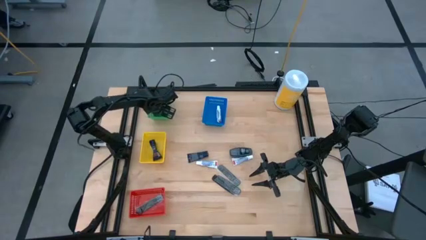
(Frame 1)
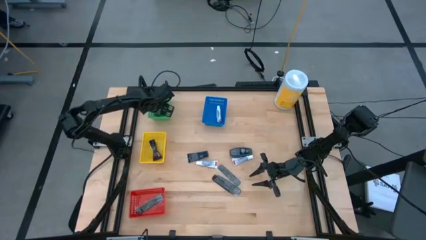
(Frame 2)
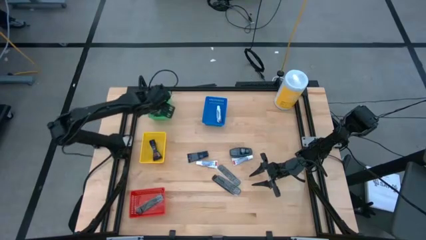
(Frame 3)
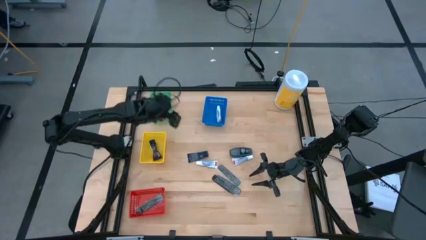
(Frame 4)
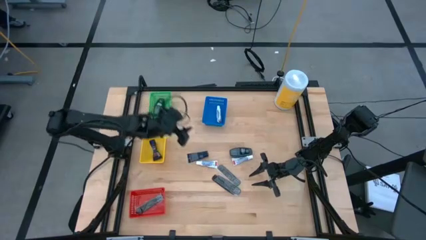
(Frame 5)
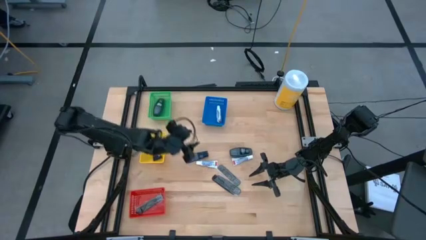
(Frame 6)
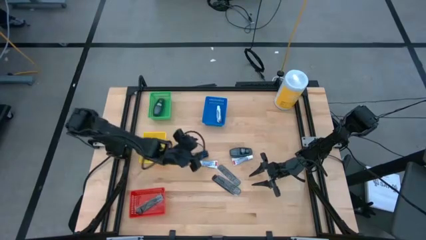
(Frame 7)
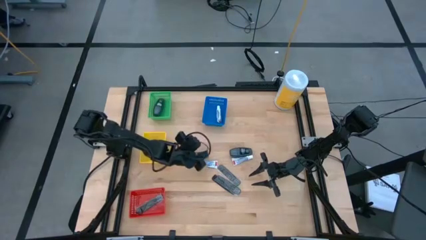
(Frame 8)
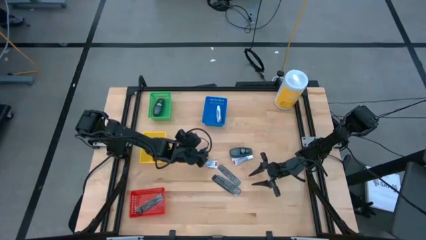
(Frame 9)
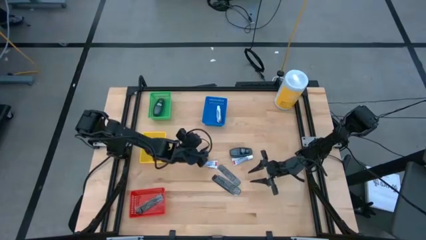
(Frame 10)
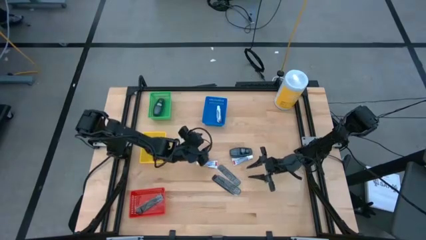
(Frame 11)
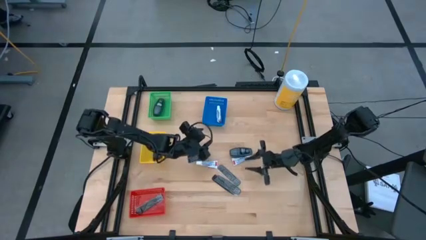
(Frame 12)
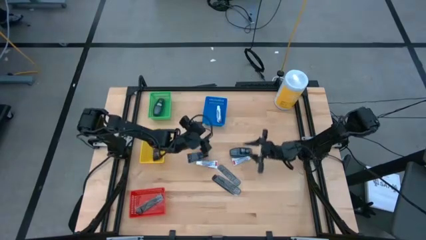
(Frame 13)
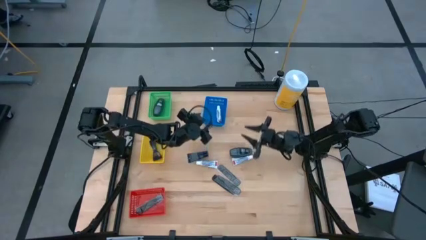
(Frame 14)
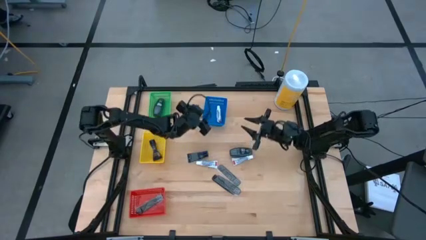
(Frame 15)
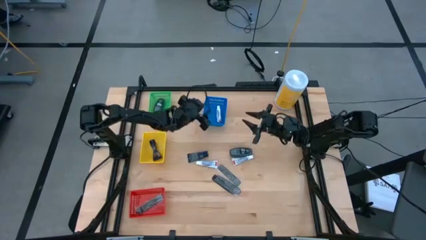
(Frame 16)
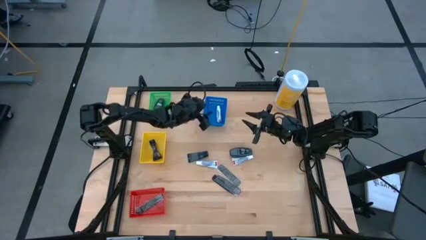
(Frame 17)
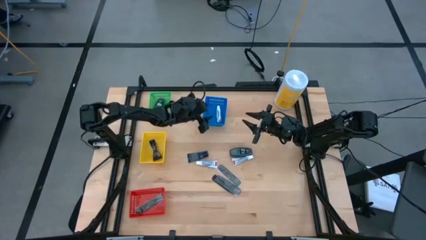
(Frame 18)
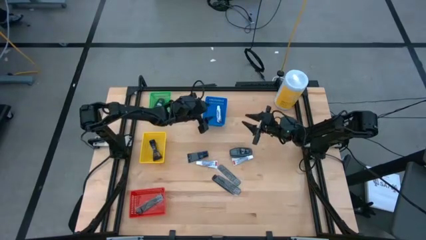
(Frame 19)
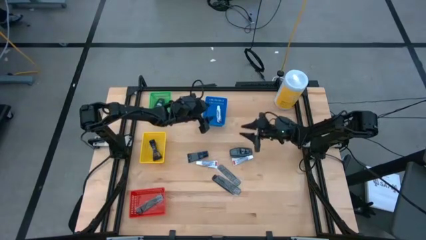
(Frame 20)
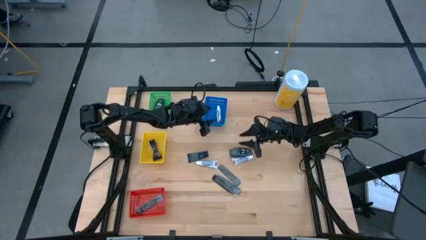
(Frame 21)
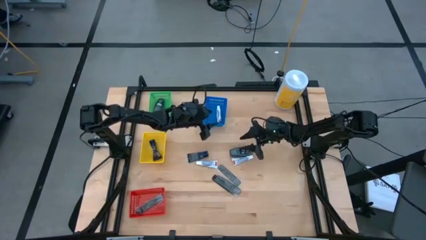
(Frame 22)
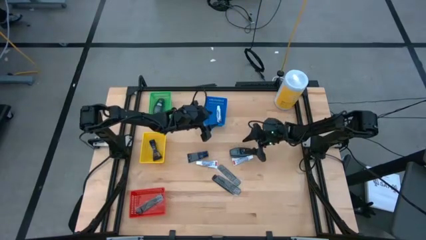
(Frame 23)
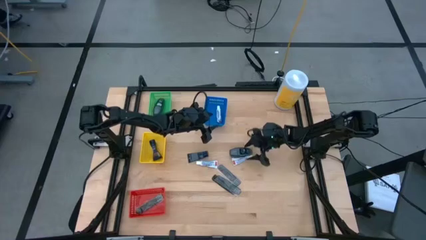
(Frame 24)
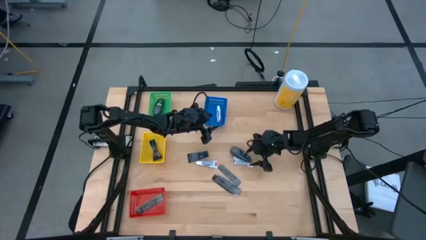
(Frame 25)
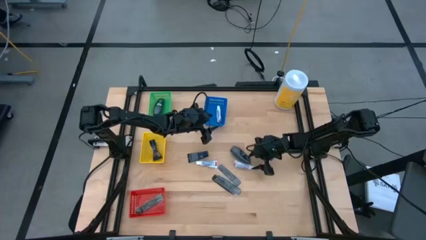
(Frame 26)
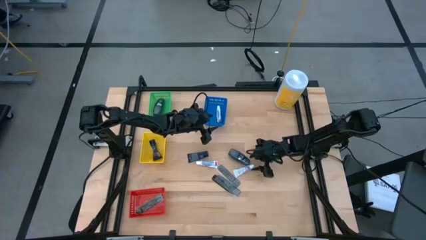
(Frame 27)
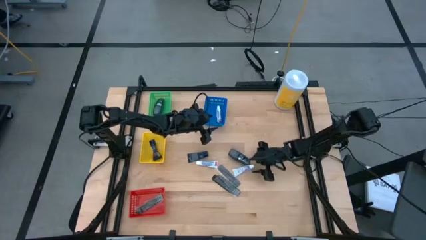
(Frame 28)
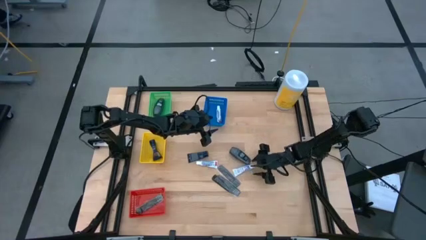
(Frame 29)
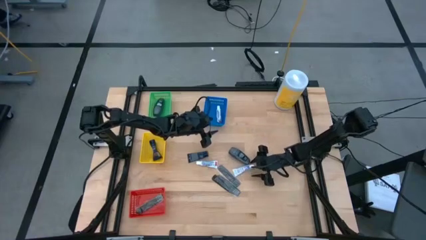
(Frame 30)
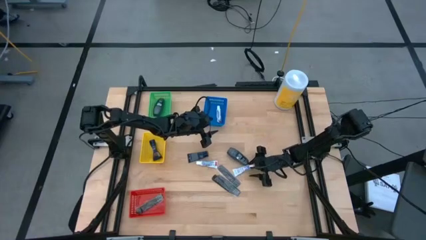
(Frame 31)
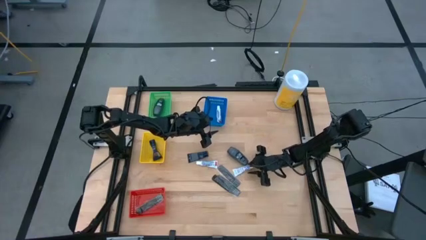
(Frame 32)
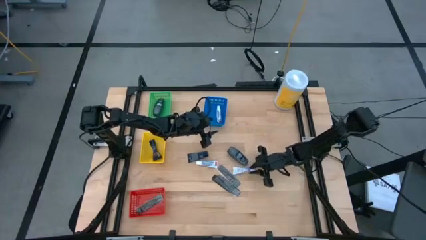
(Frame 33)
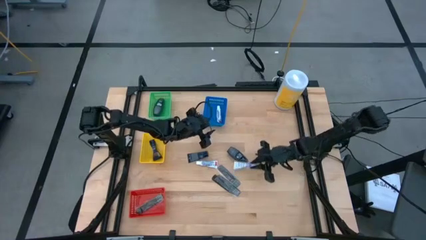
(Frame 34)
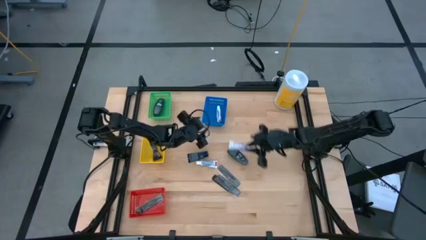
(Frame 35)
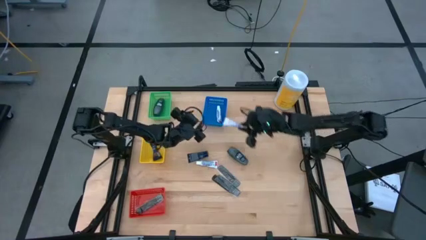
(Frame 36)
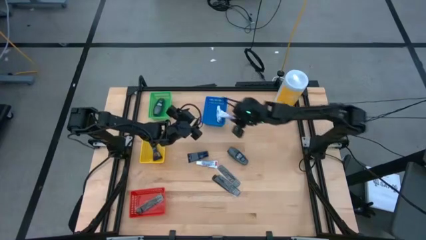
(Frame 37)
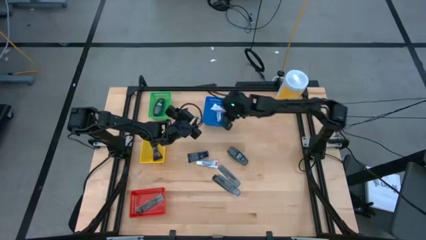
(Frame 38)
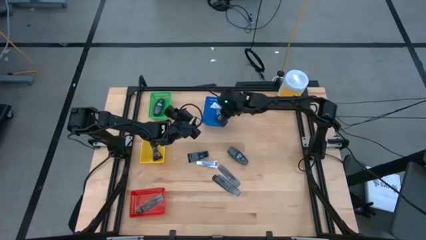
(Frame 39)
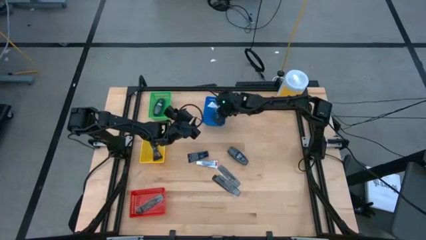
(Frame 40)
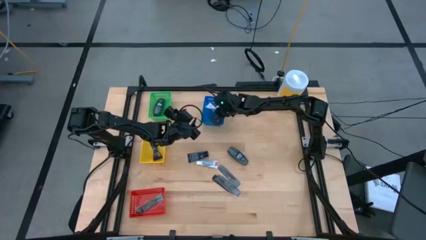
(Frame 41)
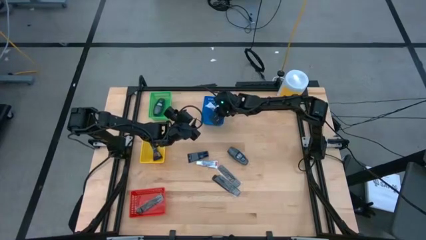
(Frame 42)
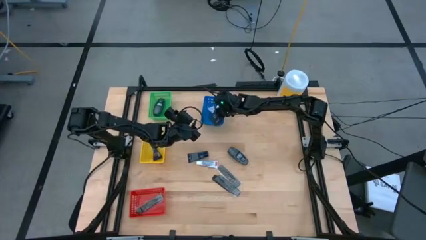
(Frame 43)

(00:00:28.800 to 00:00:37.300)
Task: Pick & Place Travel size toiletries
Put the white toothpaste in the blue basket

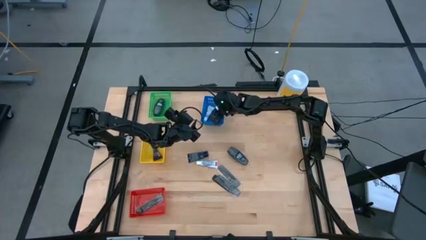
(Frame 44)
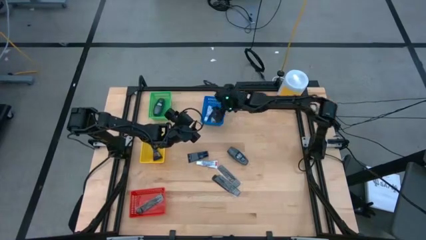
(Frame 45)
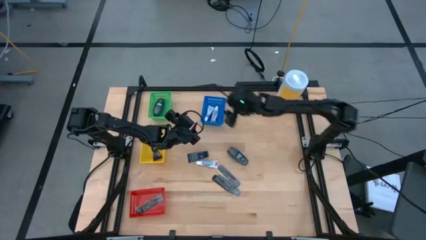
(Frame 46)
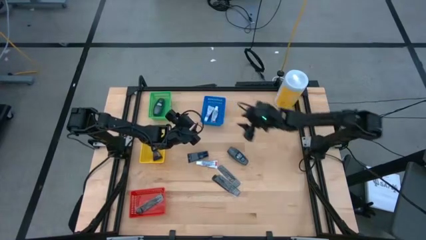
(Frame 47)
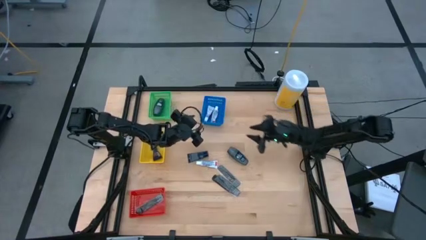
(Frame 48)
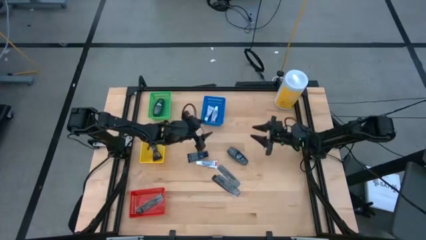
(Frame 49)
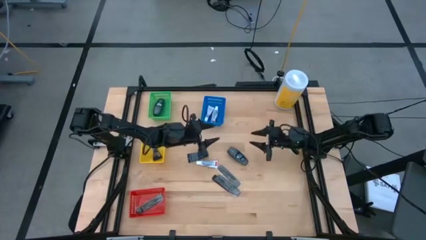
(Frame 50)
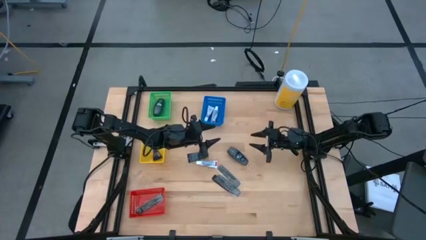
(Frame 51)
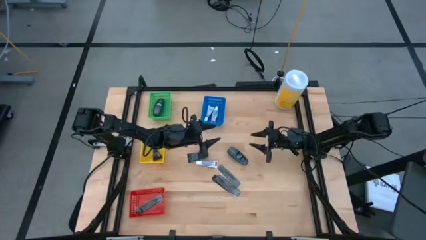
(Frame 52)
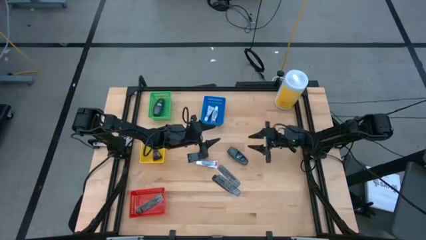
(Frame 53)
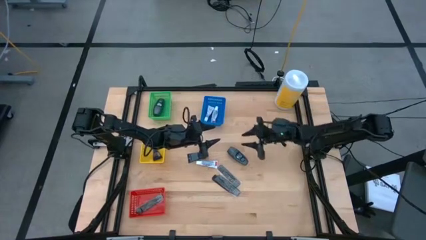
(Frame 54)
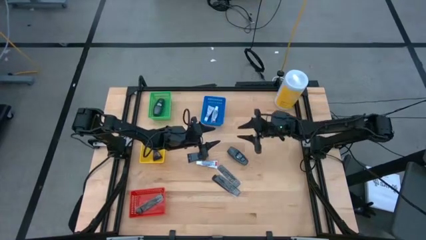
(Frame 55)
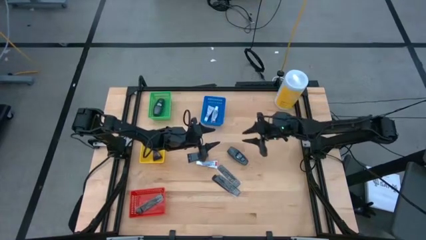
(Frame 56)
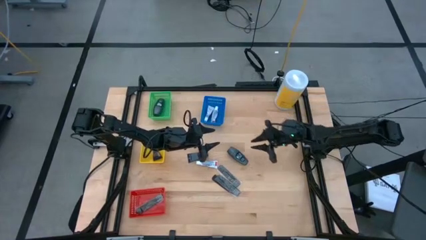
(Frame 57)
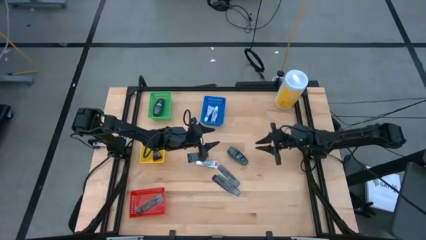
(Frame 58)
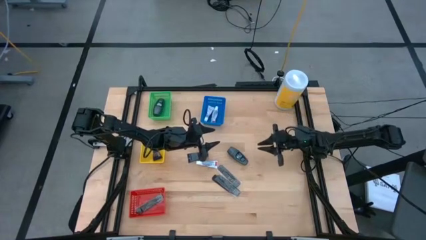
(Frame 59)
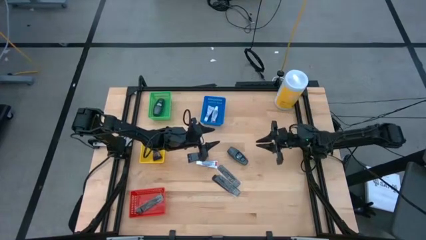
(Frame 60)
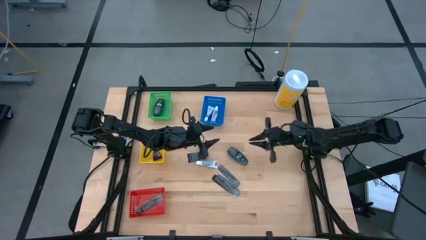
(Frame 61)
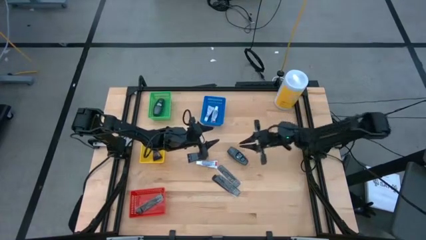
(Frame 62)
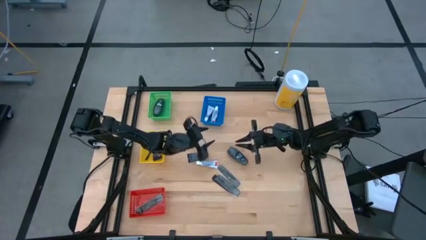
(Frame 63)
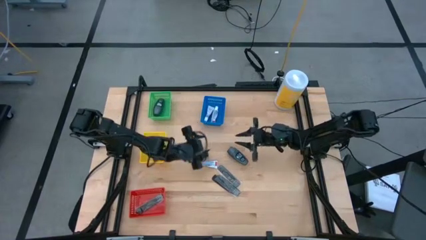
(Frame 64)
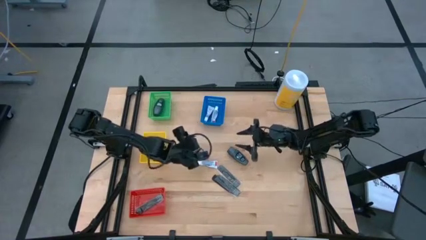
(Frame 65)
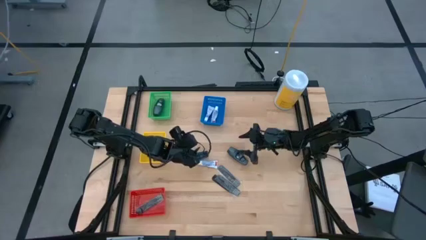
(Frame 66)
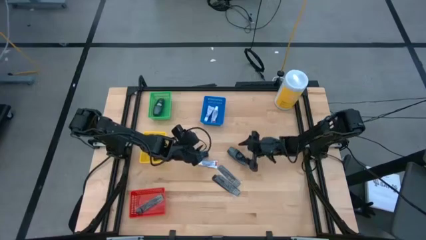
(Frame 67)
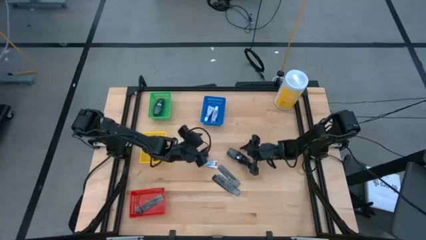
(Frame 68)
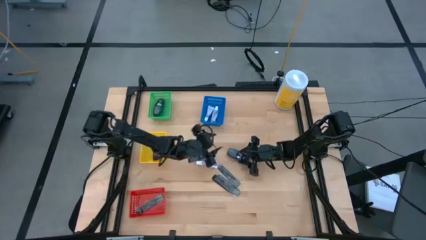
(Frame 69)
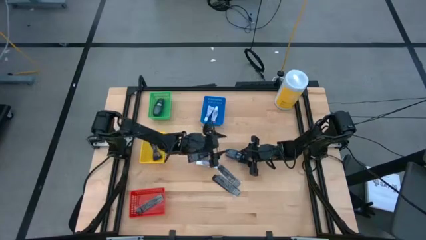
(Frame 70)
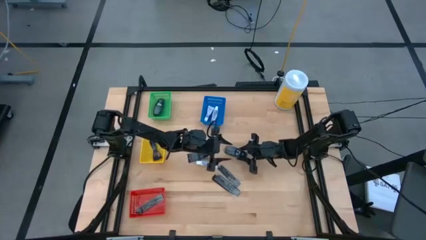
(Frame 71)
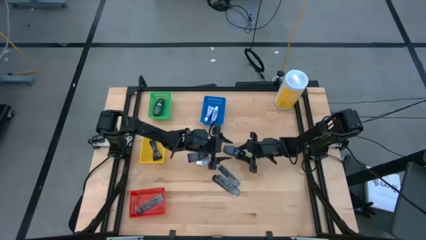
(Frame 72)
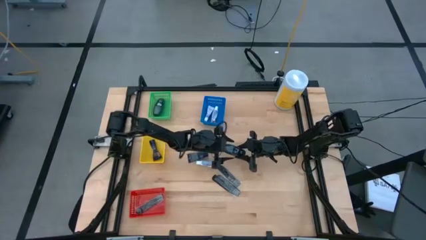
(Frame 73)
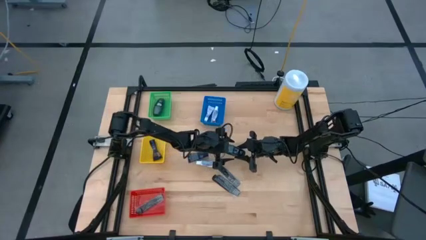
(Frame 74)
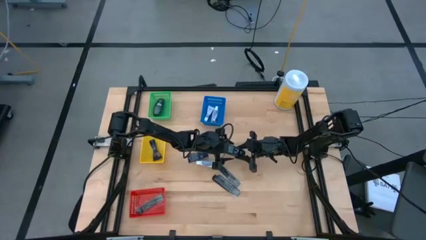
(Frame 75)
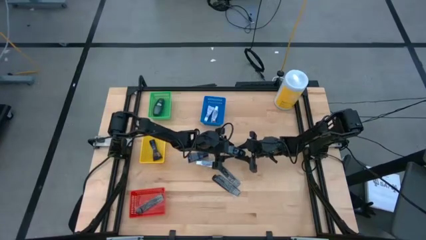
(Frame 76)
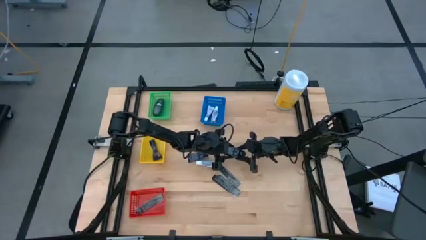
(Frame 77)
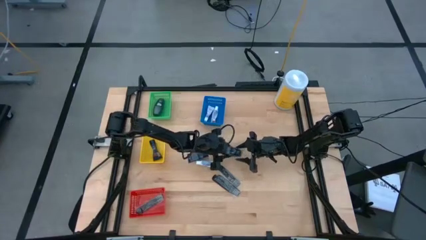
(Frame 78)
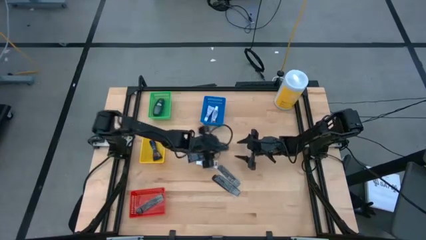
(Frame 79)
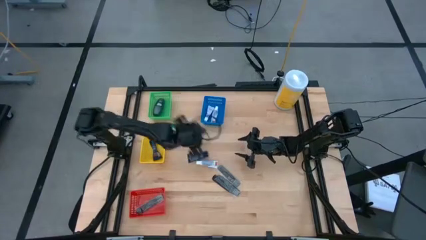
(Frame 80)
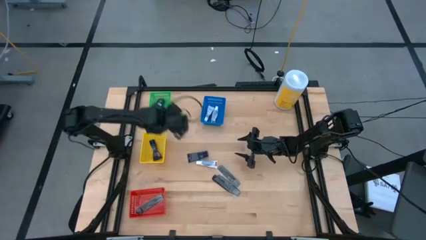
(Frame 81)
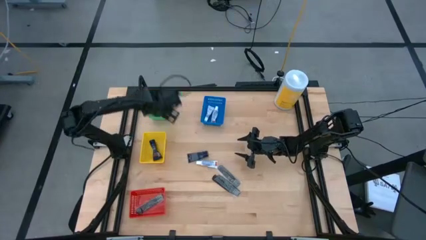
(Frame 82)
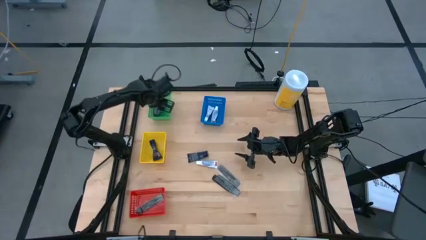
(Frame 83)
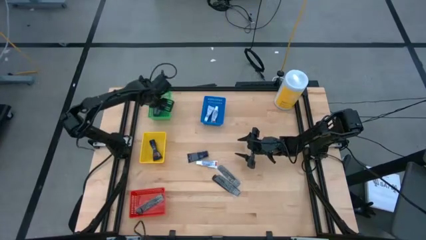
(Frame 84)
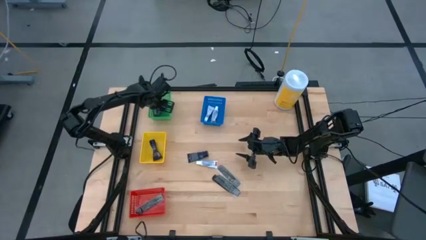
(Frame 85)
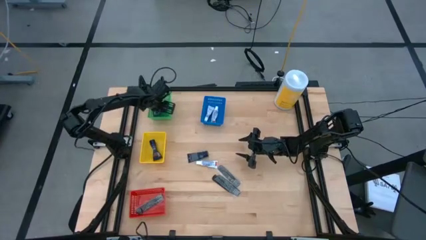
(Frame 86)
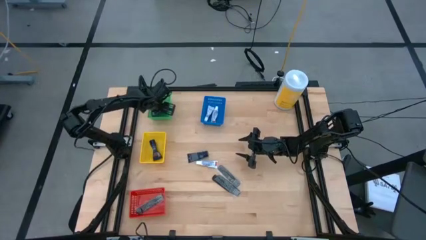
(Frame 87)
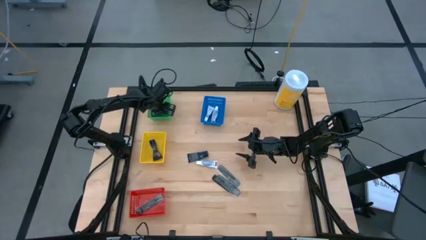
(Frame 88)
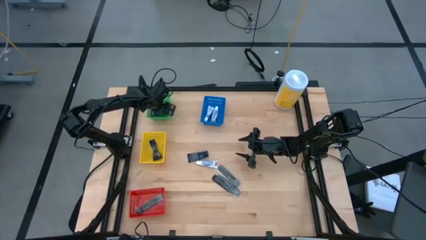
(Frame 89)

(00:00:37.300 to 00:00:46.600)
Put the black deodorant in the green bin
